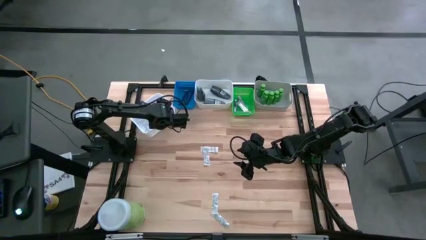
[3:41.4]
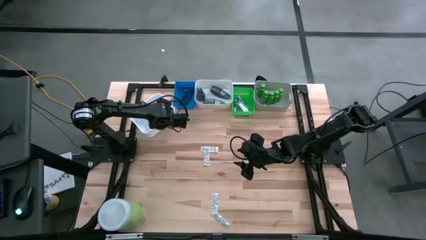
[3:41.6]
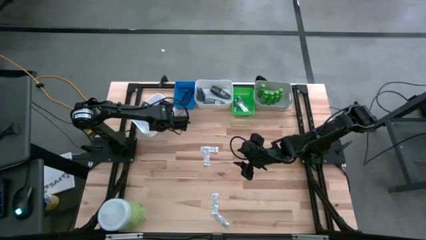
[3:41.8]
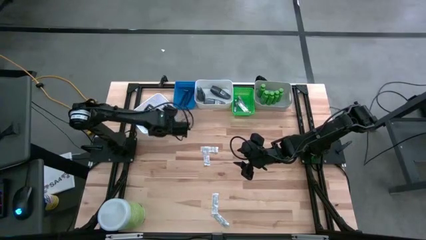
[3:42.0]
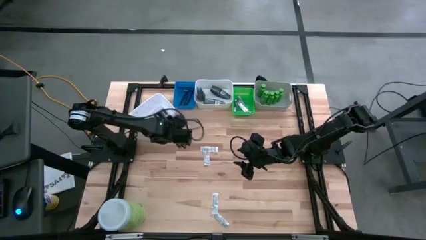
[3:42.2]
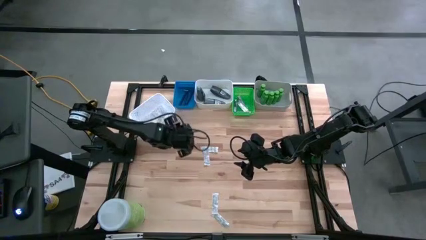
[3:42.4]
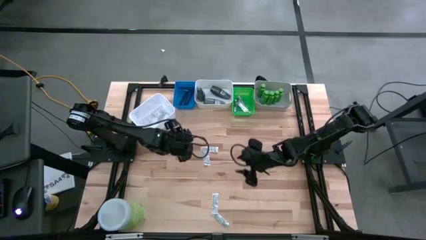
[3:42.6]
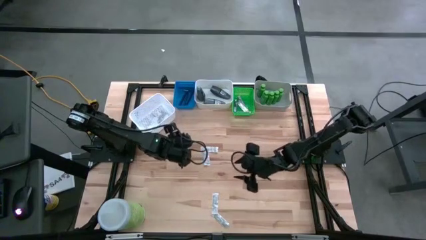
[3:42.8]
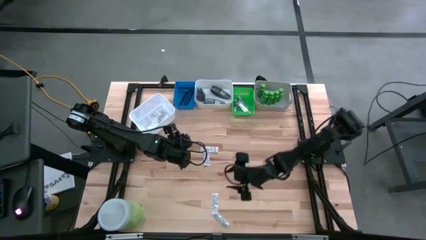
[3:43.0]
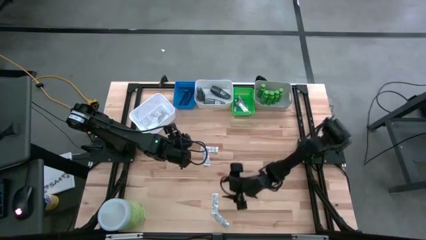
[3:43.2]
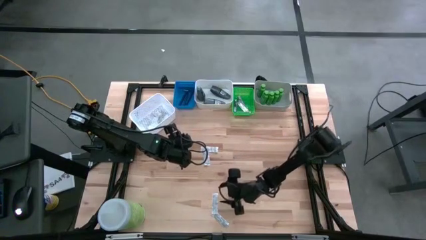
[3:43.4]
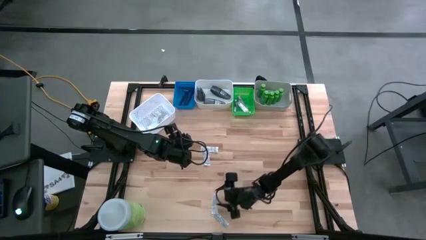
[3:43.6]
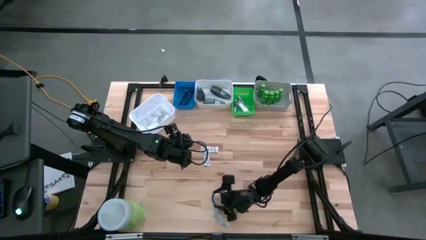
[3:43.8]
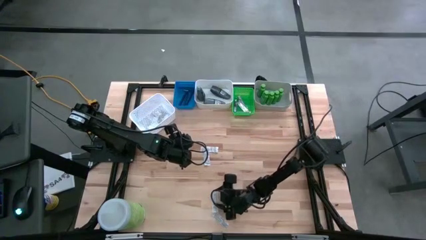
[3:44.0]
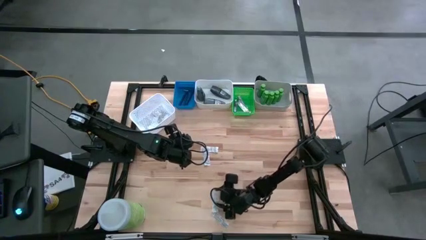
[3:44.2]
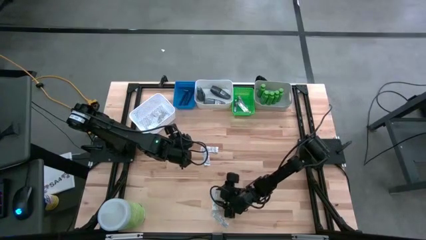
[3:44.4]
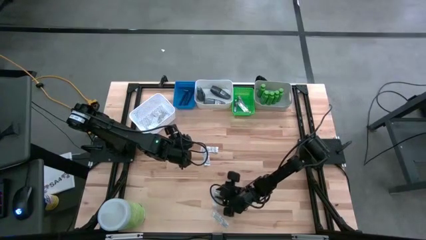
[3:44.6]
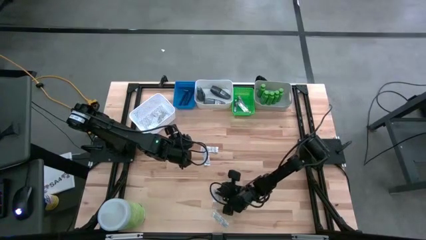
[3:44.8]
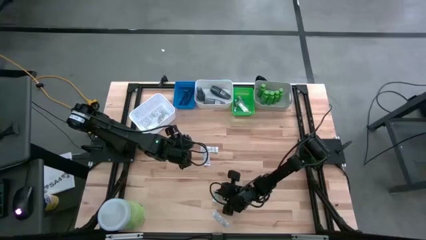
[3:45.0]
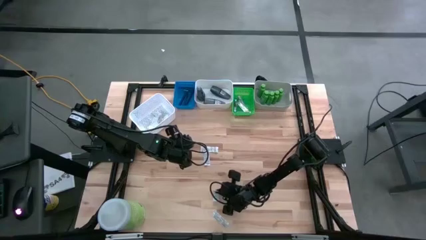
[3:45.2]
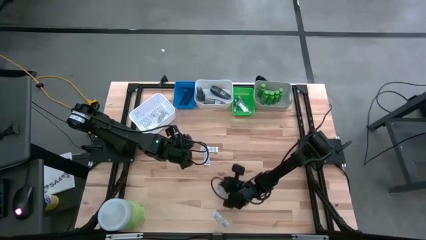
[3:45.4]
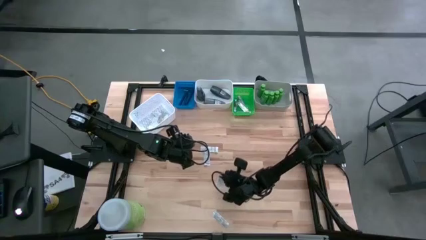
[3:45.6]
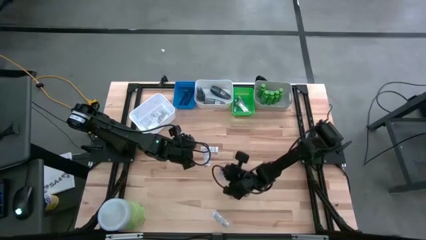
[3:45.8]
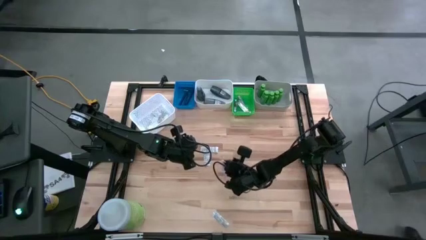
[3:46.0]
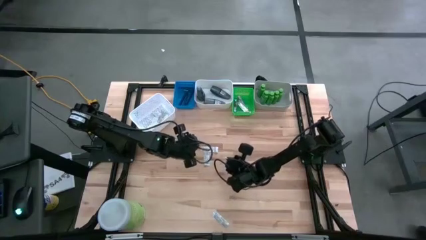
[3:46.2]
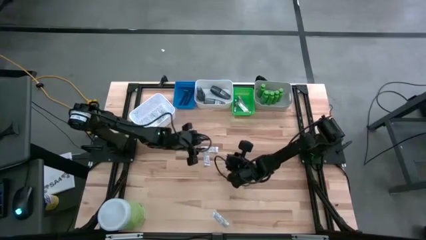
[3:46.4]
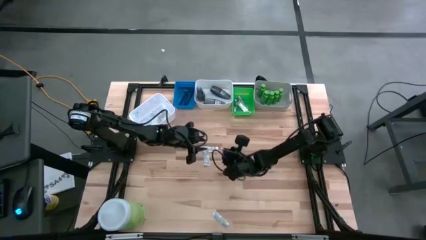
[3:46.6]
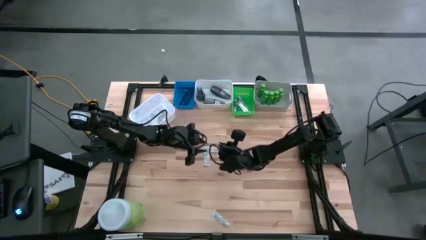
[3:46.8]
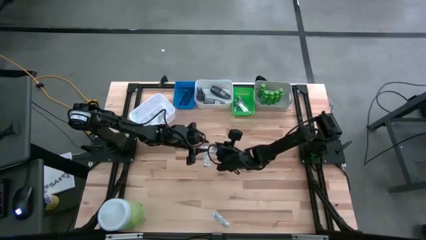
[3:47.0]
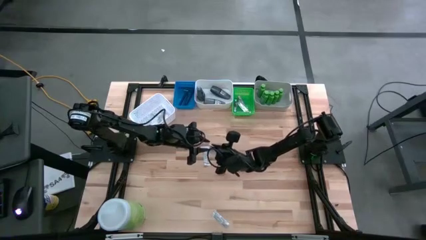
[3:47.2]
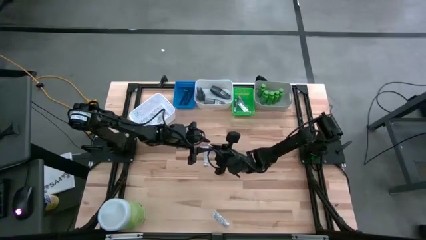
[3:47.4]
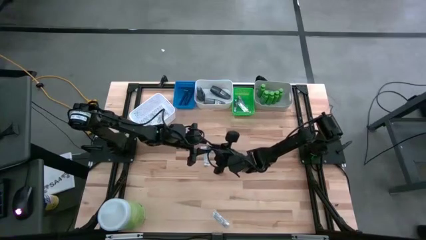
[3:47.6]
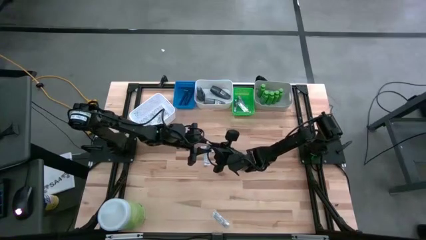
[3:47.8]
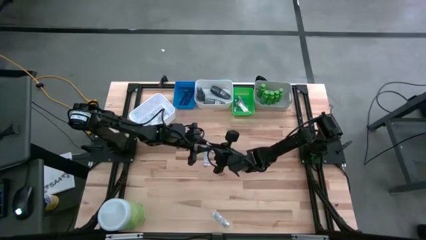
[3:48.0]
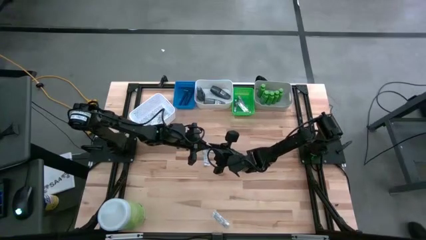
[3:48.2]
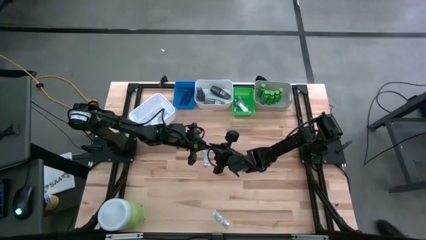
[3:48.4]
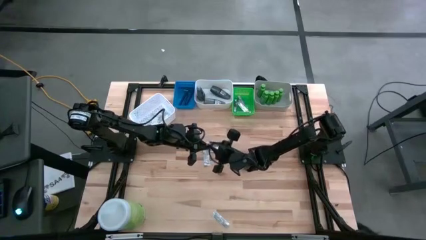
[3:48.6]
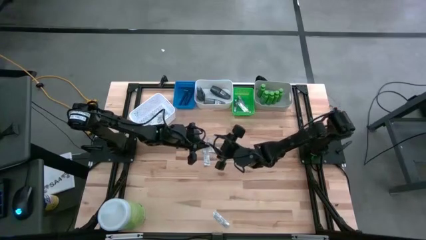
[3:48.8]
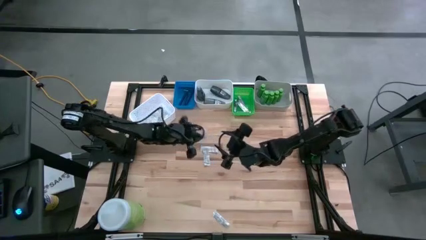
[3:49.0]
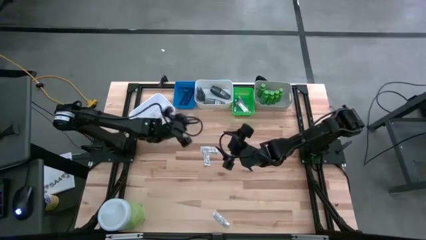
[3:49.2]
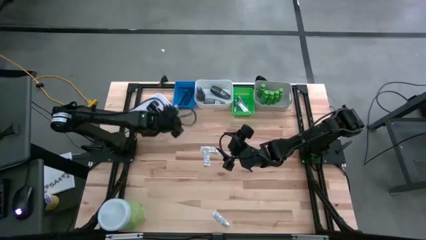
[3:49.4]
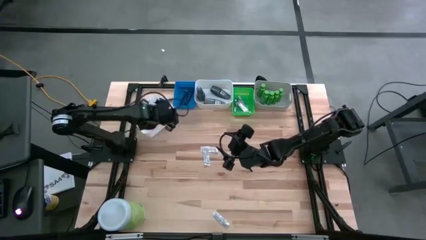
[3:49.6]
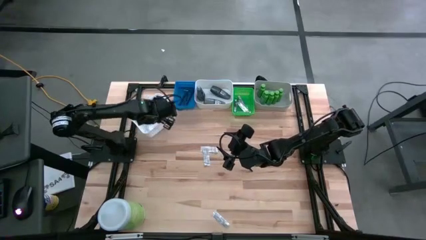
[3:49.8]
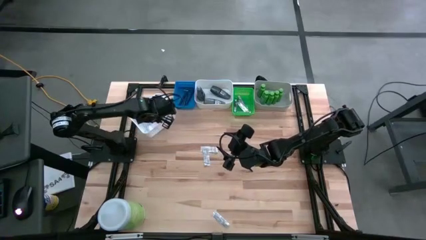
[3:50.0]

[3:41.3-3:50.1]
Task: Pick & Place Travel size toiletries
Put the bandage pack into the left white bin

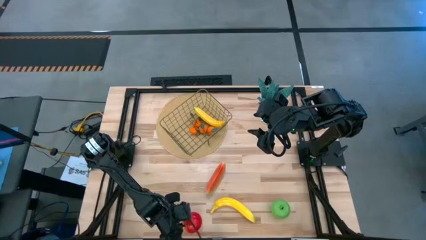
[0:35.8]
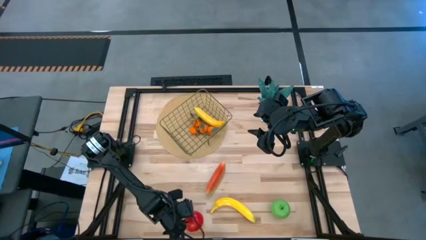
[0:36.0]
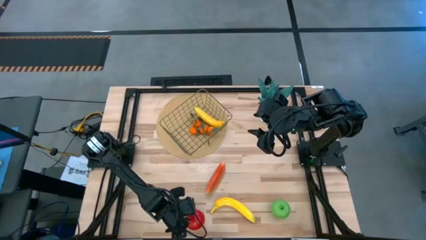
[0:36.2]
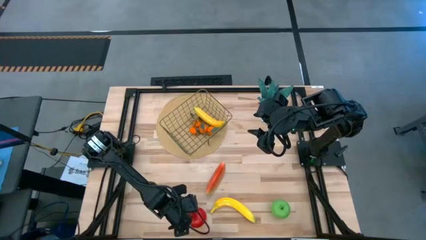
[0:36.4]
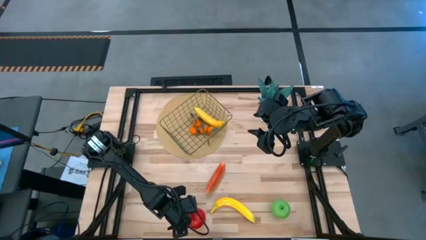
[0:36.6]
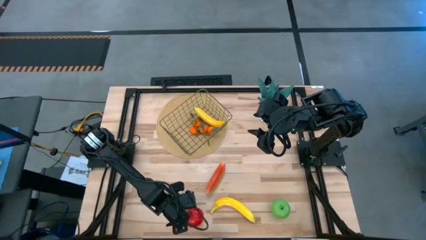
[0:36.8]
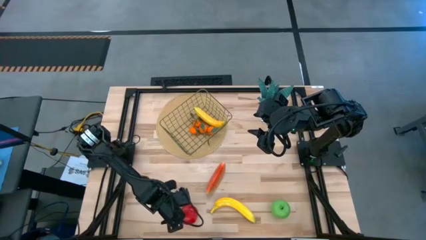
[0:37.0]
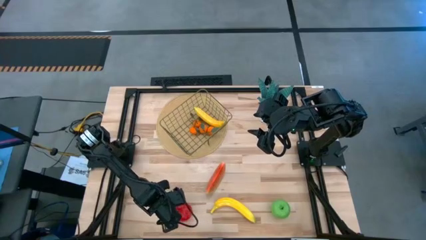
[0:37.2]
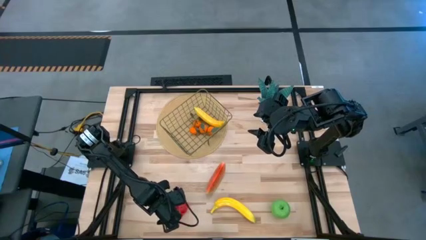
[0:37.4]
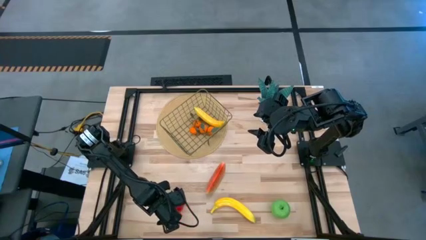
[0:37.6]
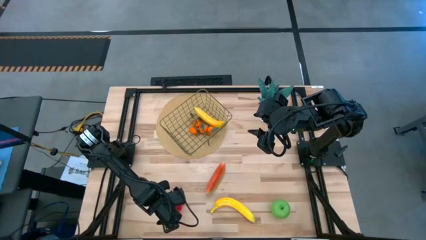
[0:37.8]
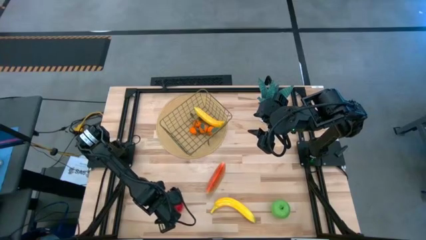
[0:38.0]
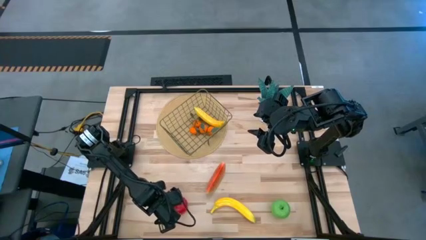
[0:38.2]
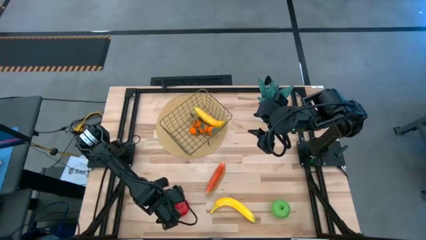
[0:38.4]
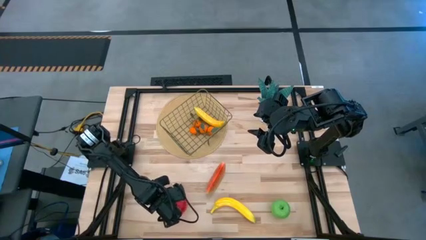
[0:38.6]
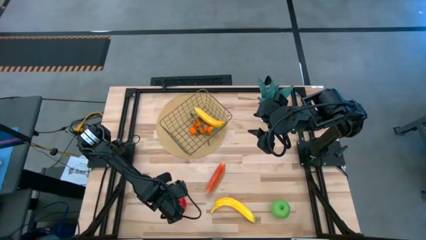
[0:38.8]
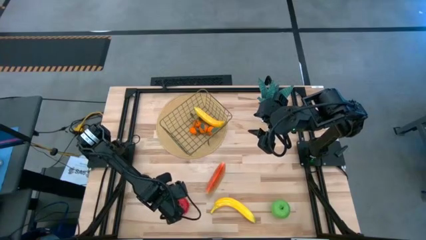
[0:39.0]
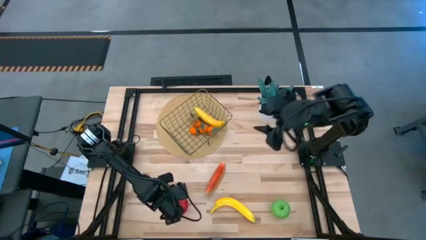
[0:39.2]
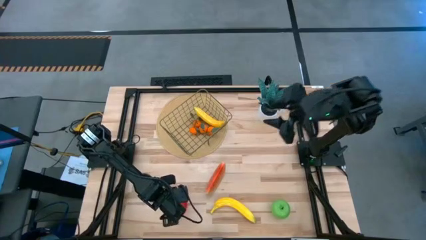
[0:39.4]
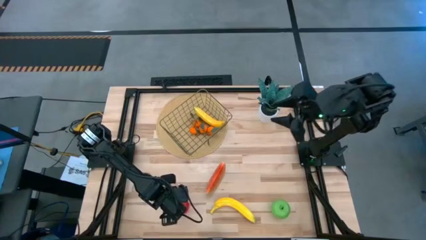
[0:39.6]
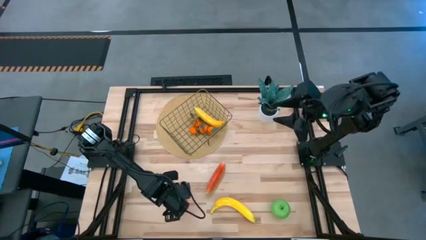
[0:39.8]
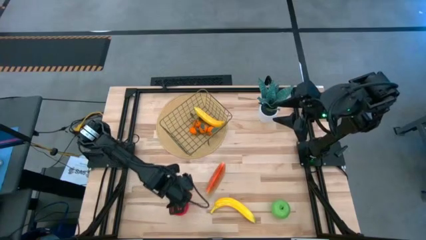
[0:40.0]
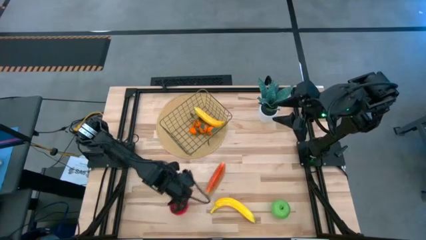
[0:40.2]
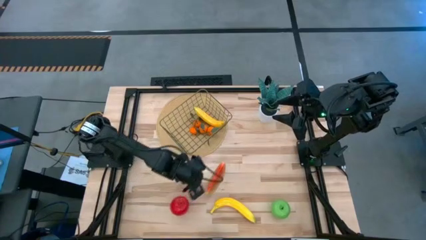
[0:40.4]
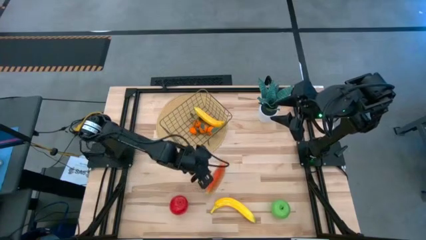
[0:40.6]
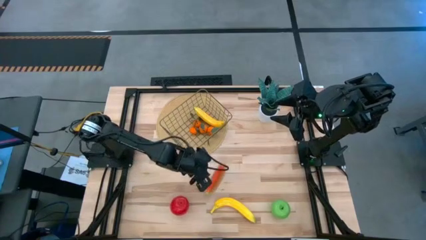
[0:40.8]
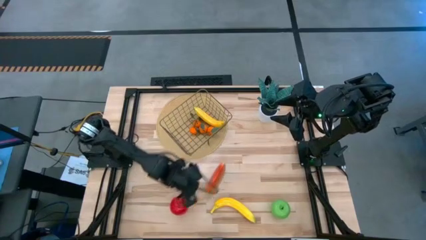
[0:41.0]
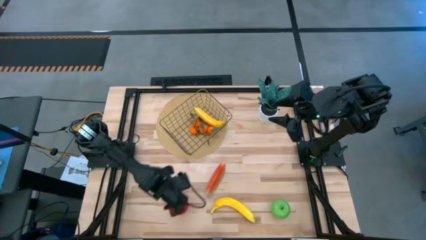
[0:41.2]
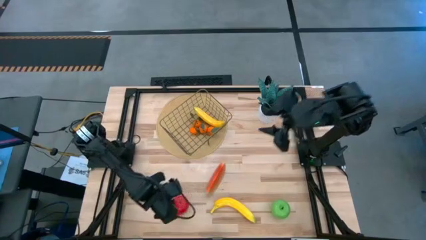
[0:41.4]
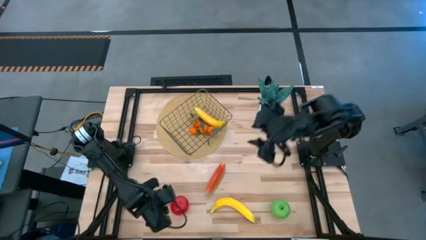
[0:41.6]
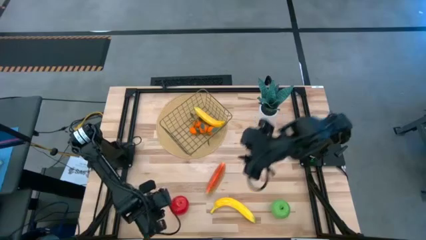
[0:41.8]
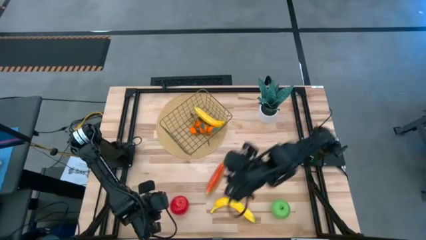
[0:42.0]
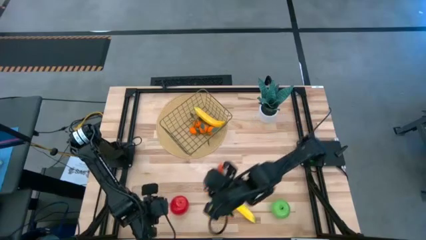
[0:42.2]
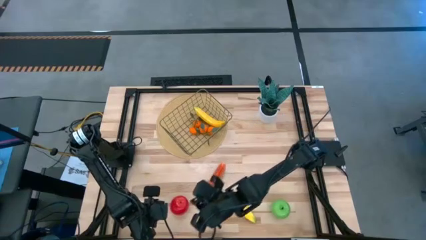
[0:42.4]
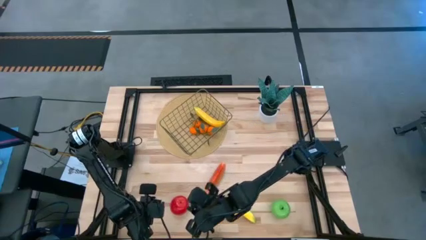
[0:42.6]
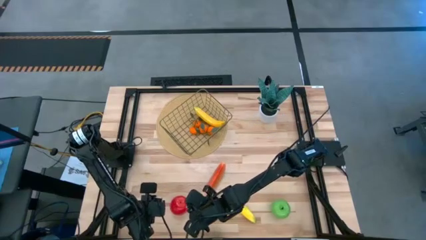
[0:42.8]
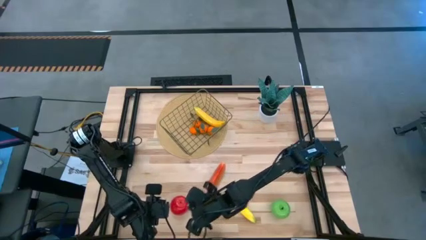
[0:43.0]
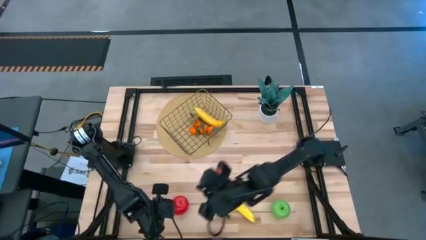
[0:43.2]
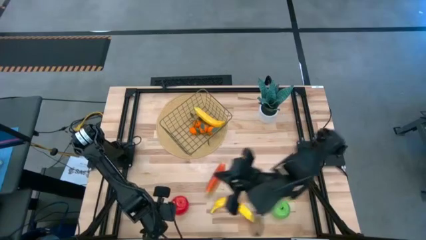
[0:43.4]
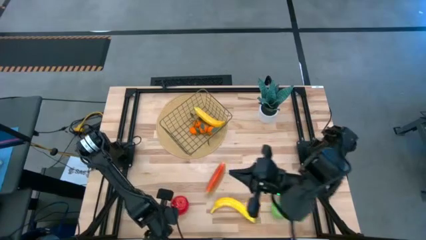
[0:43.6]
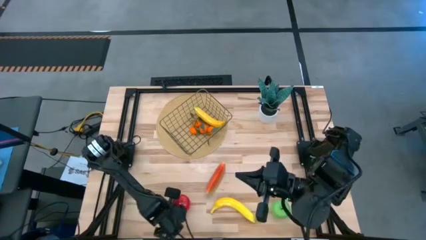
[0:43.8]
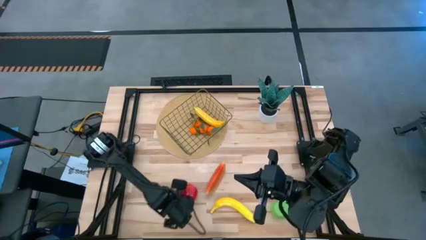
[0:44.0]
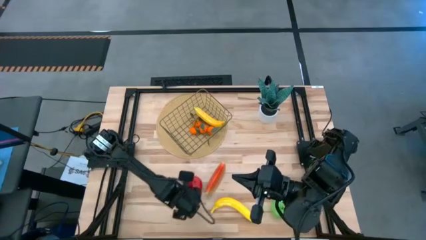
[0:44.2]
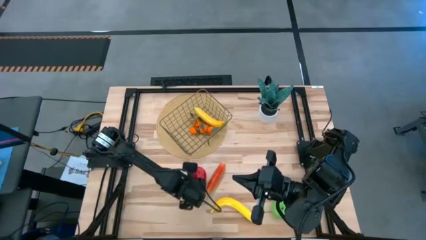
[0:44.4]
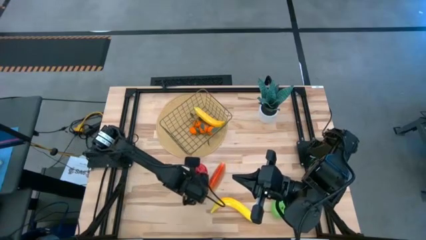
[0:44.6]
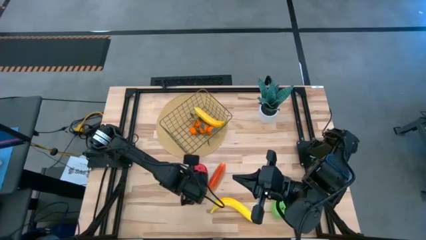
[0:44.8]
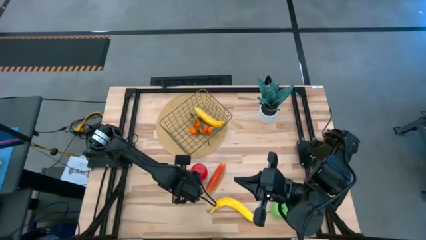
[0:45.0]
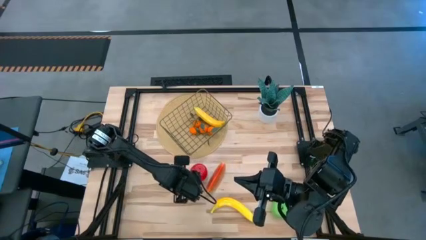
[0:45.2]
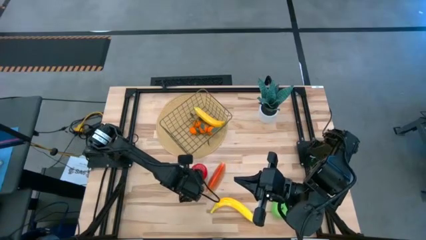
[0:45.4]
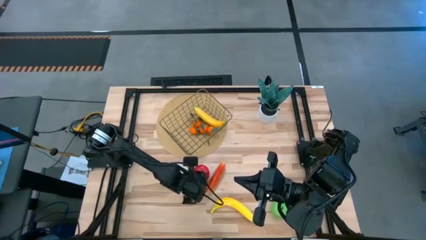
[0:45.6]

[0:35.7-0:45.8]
Task: Build produce basket
Move the red apple to the center of the table
